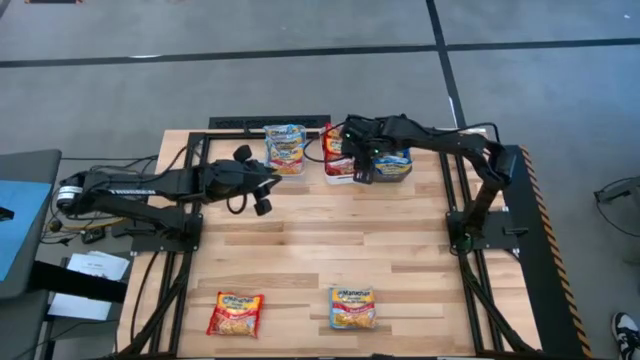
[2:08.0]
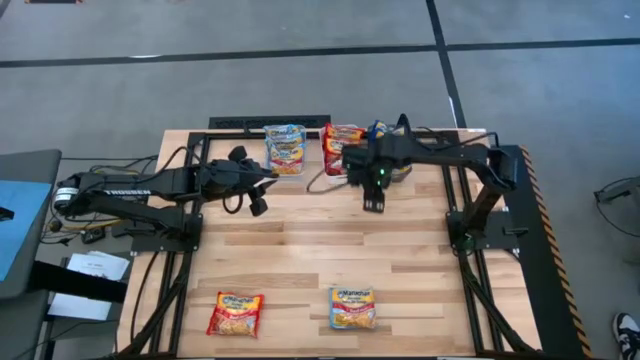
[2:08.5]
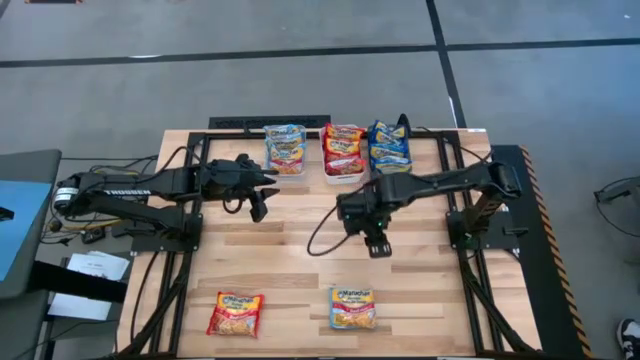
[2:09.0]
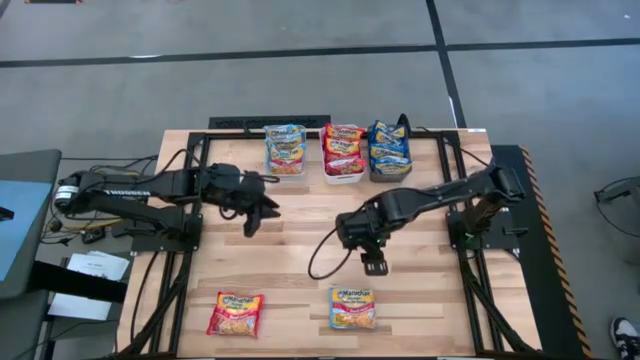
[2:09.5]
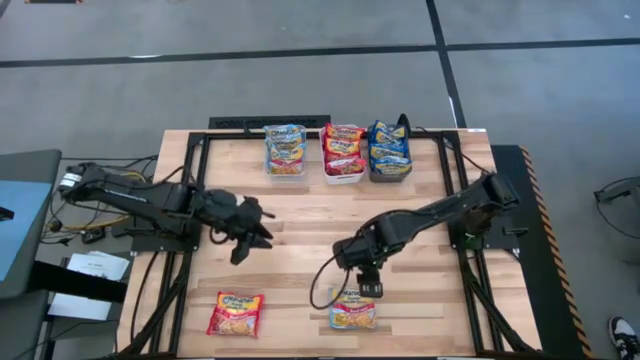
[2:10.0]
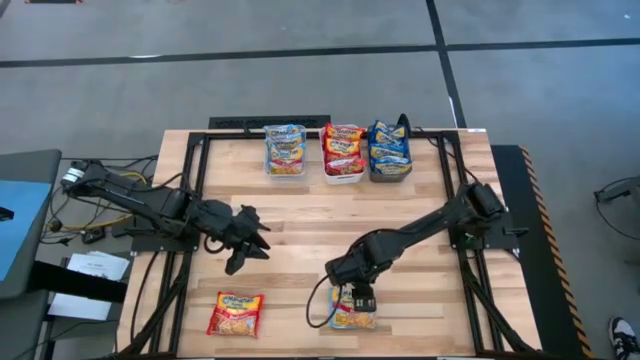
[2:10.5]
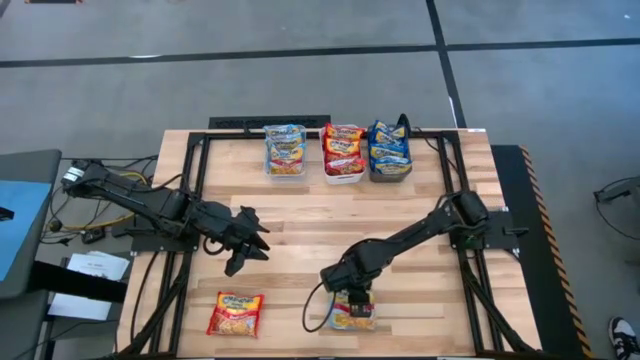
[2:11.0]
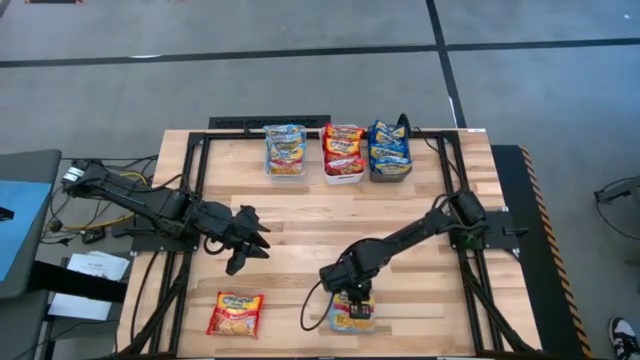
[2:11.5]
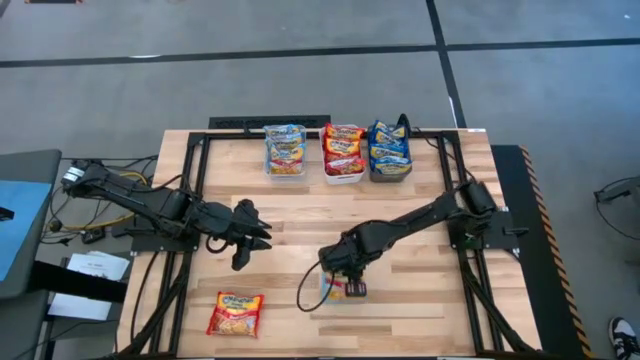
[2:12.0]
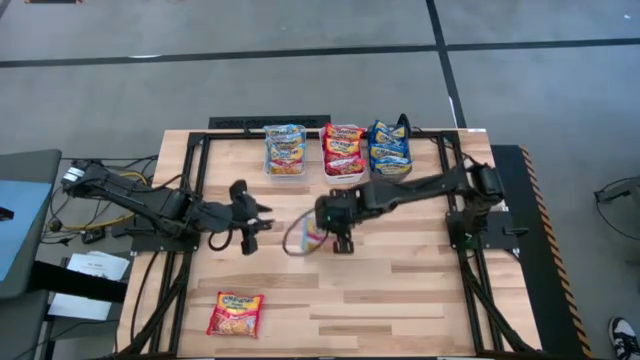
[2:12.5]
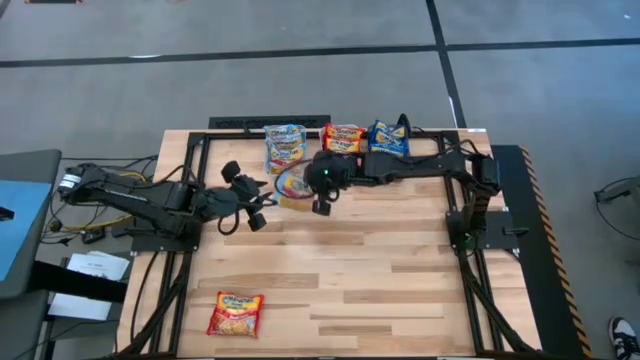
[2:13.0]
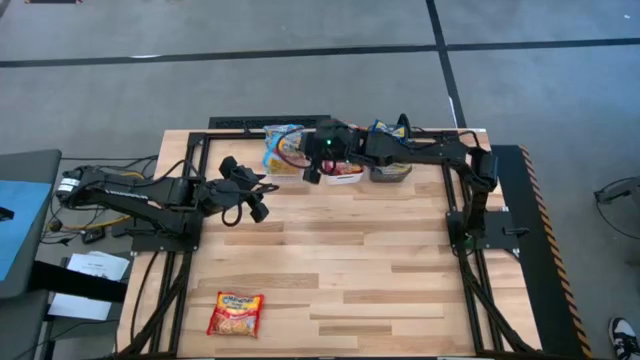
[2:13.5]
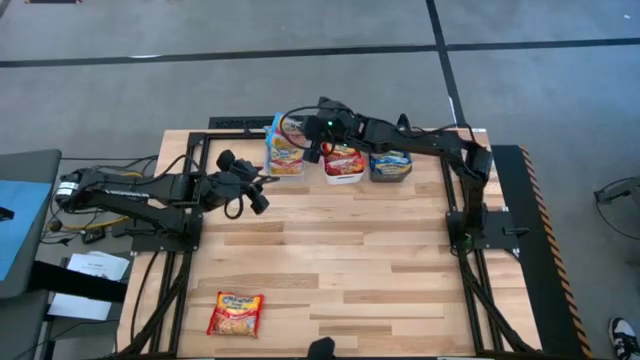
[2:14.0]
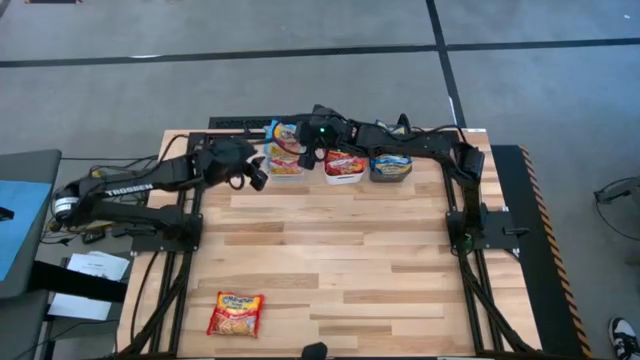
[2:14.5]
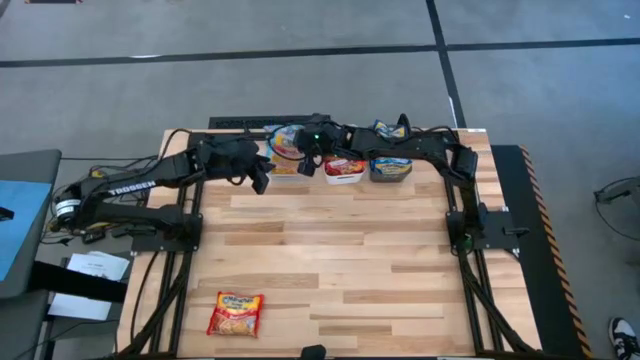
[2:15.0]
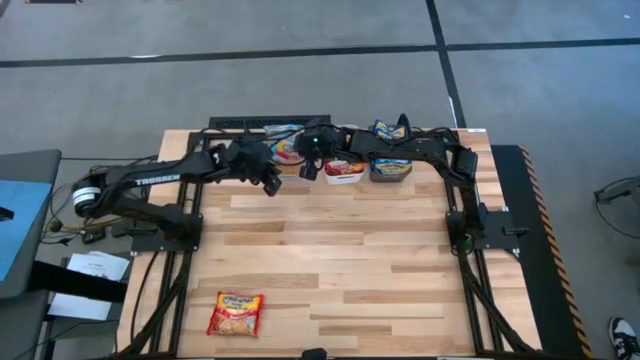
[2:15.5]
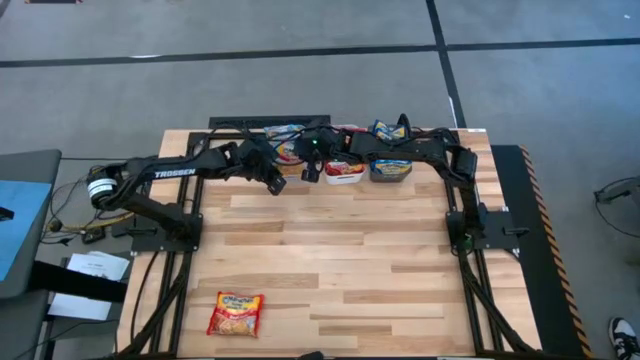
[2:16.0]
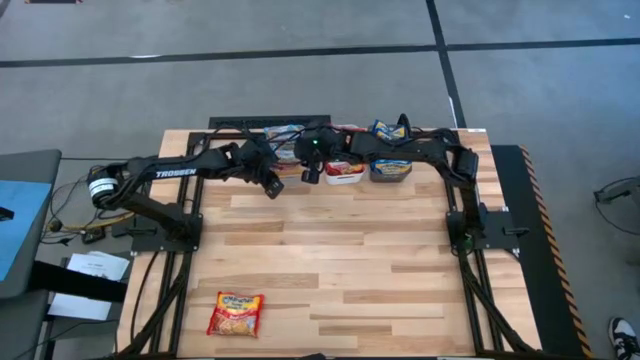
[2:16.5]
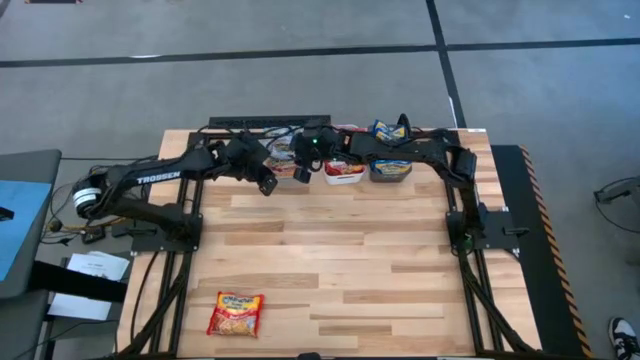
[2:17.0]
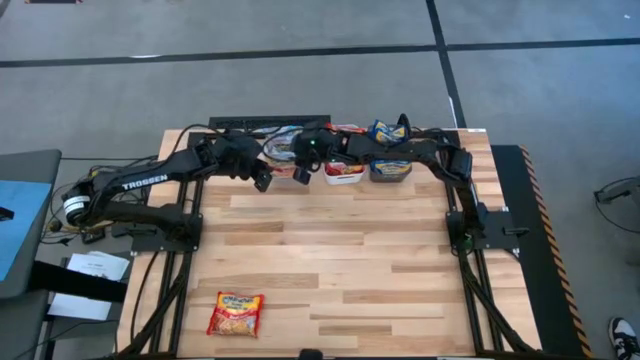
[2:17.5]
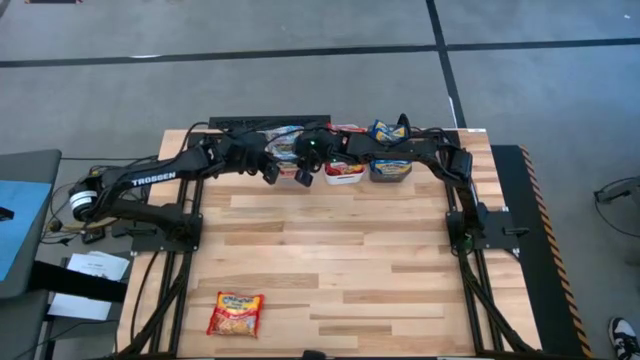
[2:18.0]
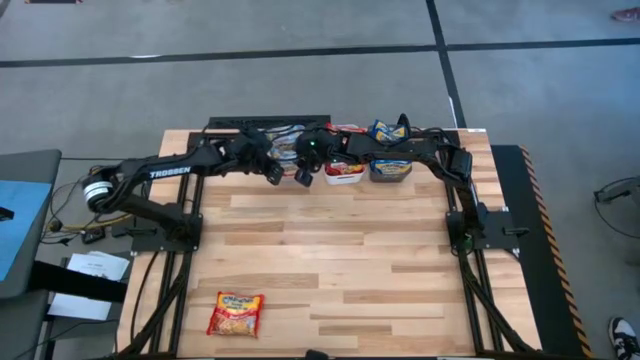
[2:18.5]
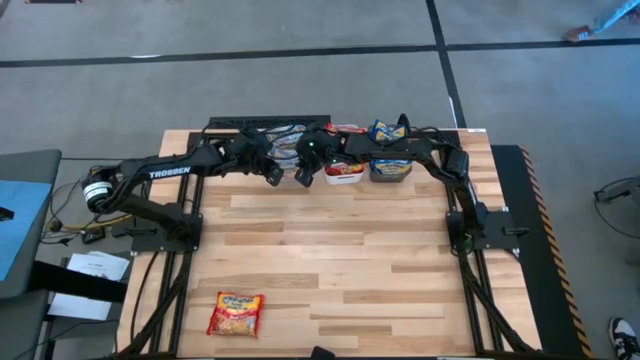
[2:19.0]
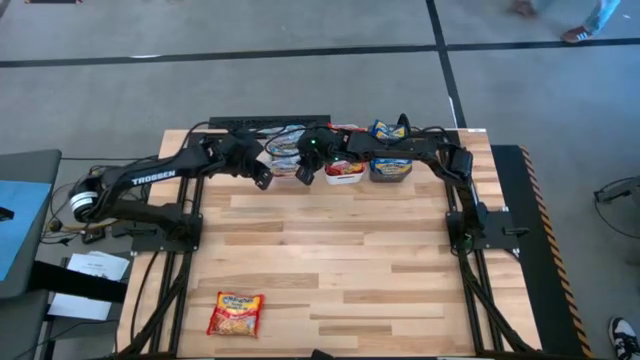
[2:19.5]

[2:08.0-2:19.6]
Task: Sort Maruchan noodles
Put the light blue noodle pack into the transparent bin

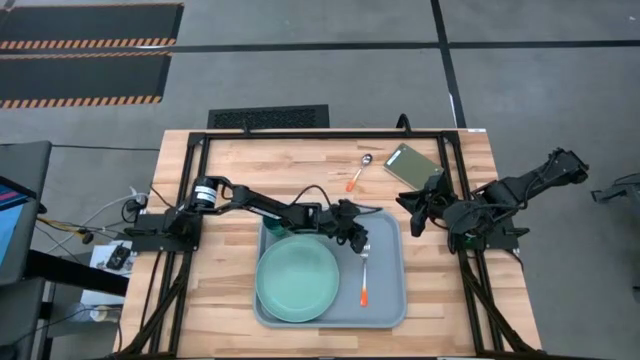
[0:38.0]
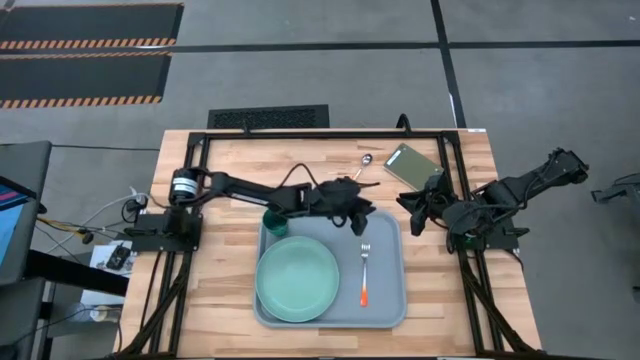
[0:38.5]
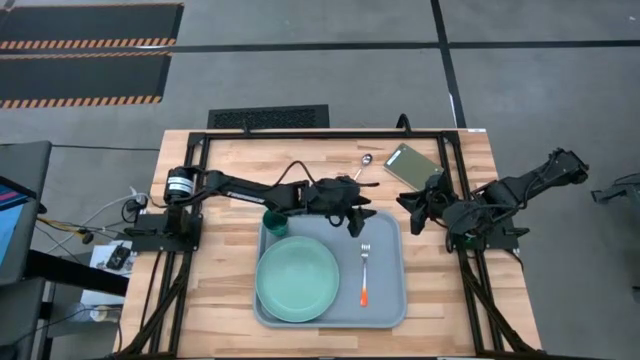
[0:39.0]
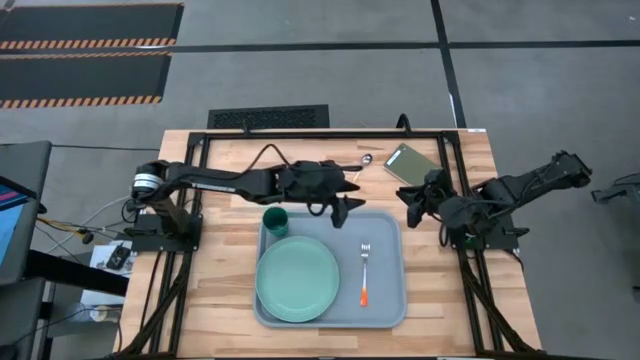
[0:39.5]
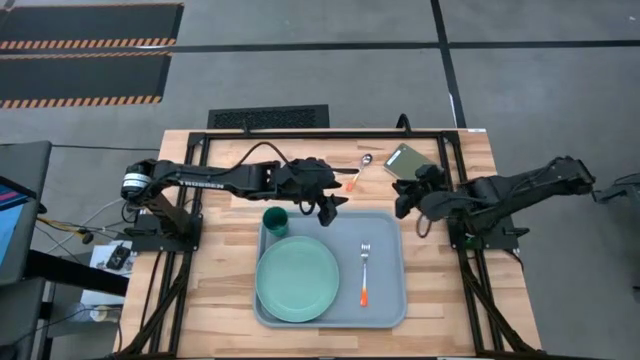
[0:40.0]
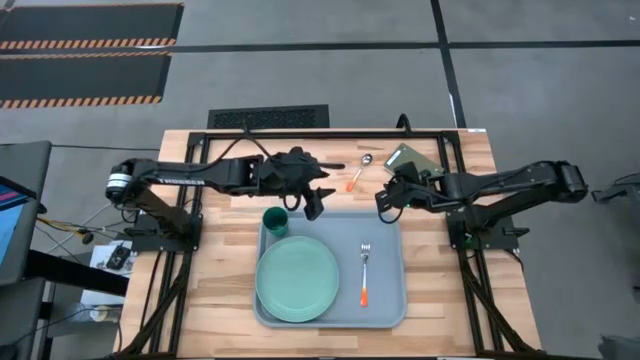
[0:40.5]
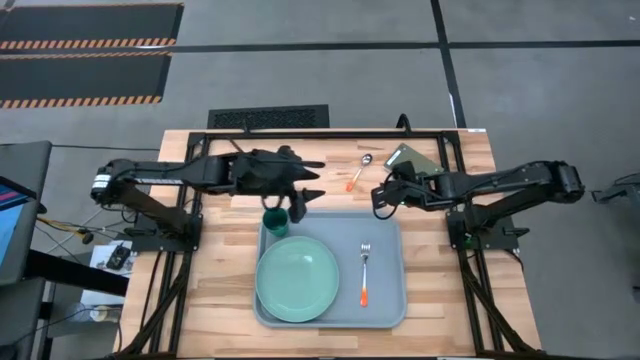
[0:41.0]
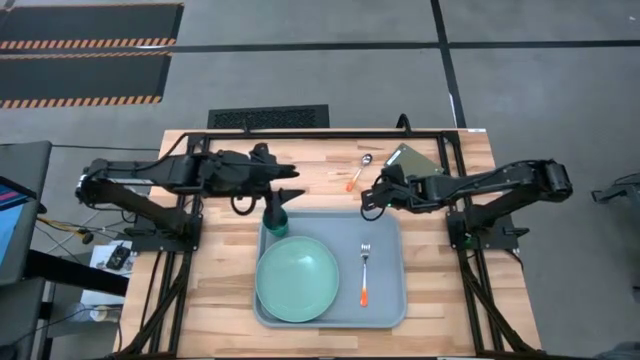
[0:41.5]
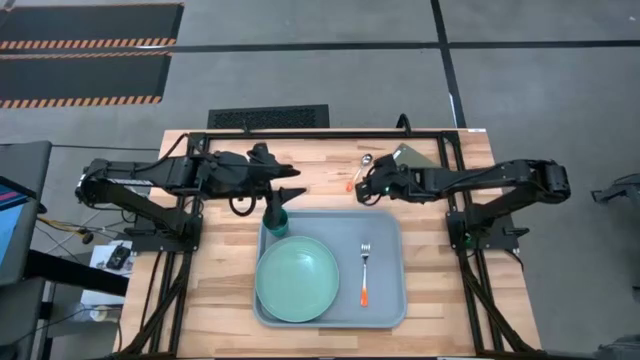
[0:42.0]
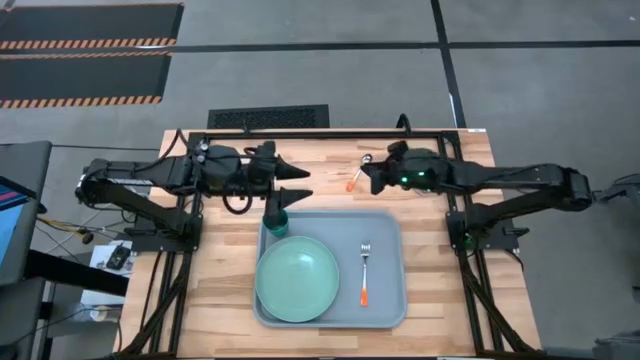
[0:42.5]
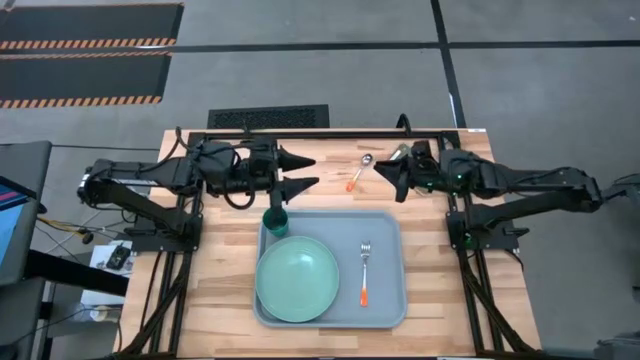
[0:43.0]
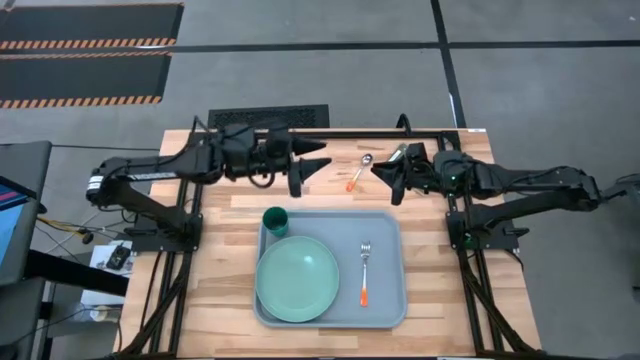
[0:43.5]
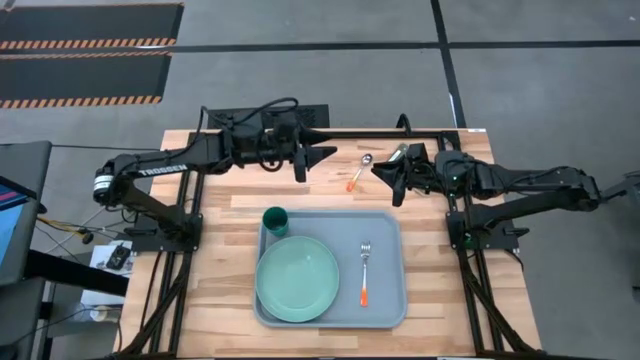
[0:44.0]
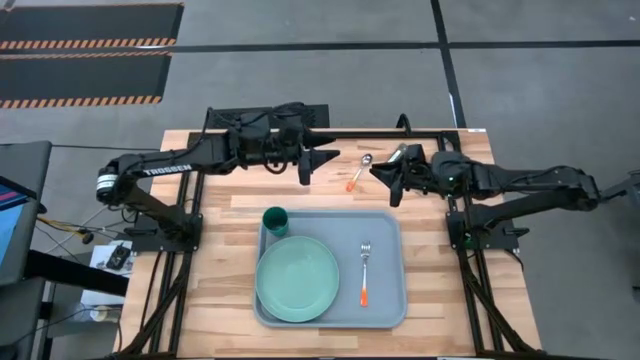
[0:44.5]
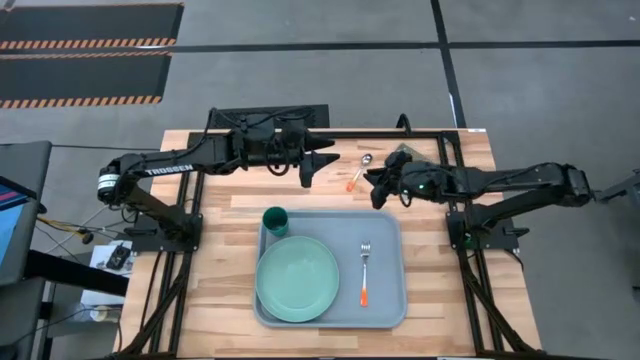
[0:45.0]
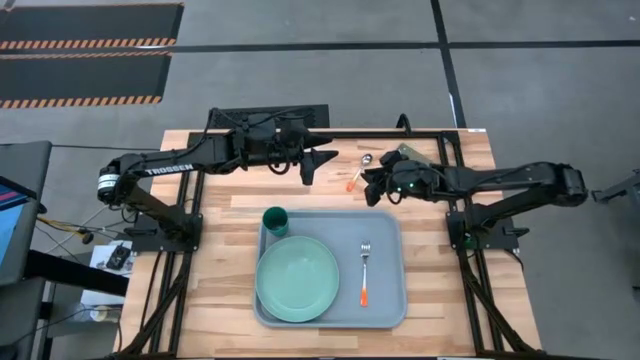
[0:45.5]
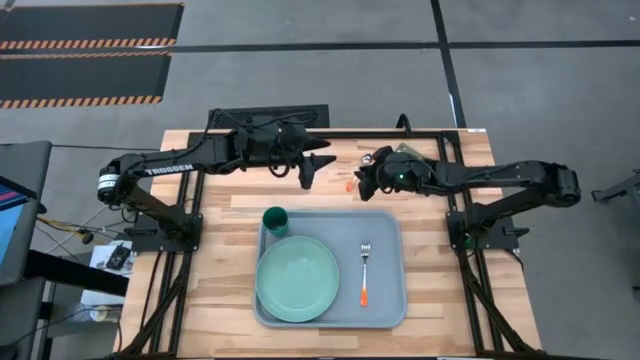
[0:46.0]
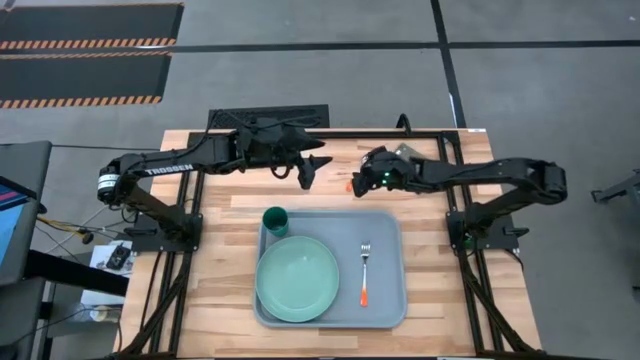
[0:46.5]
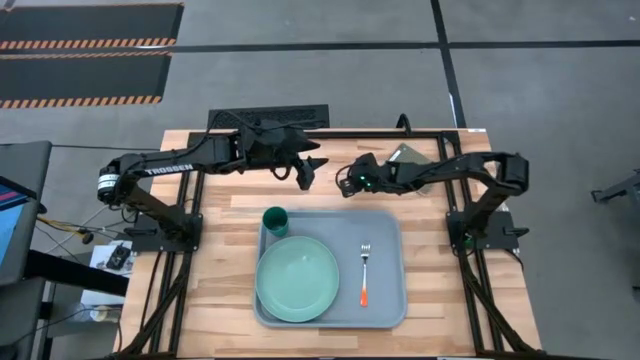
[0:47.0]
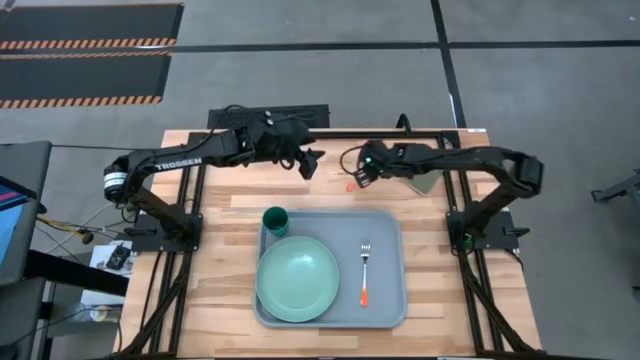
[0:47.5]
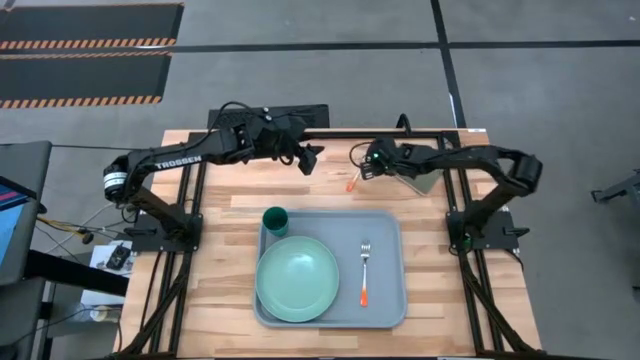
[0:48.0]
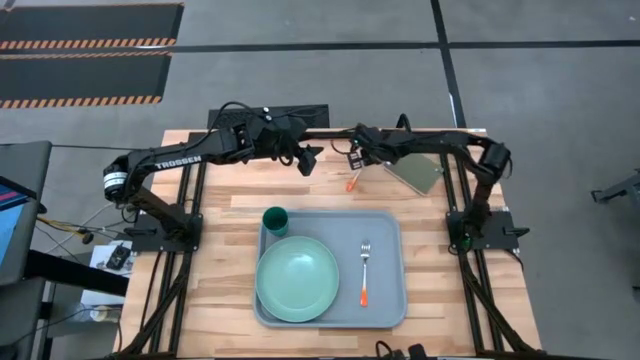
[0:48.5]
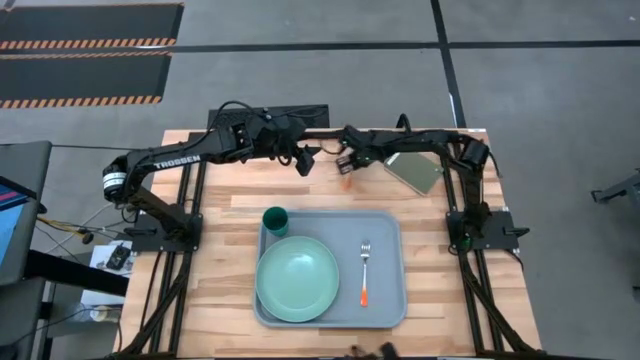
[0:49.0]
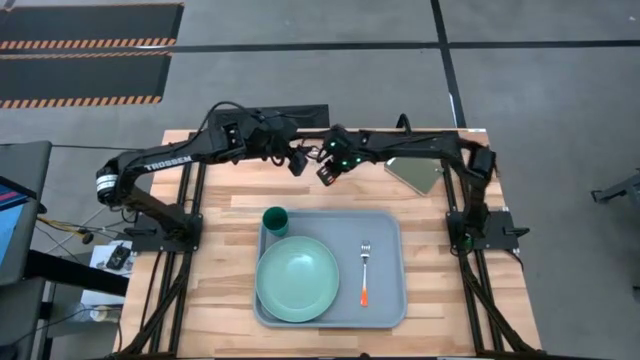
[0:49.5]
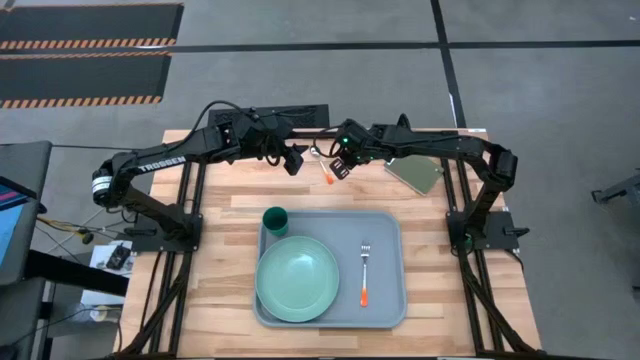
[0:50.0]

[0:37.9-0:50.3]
Task: Pick and place plate/cup/fork/spoon on tray
Put the orange spoon on the gray tray to the right of the orange fork
